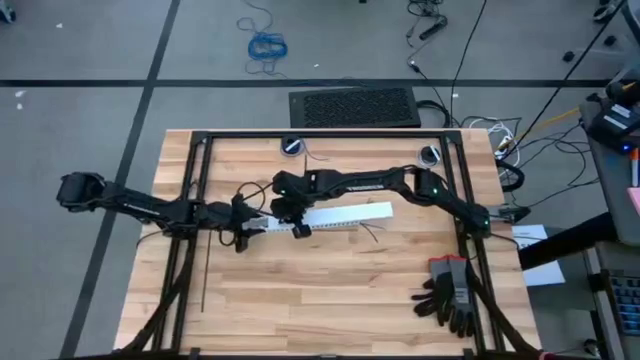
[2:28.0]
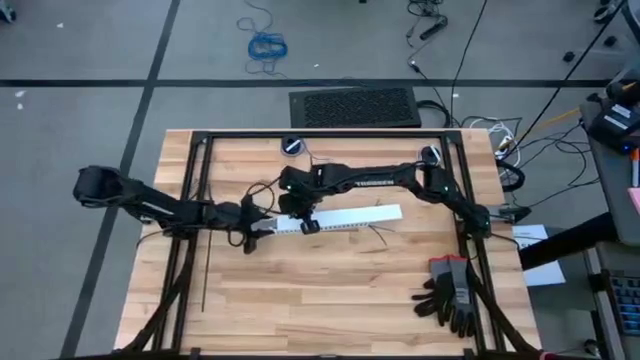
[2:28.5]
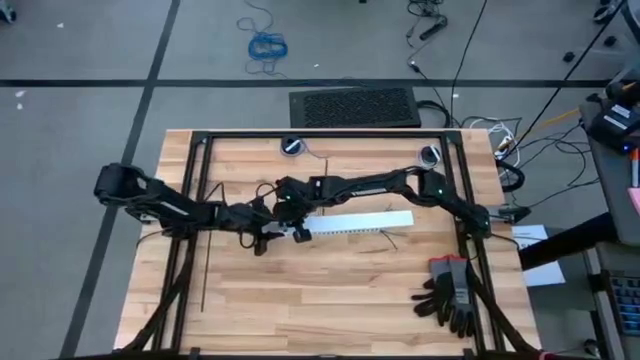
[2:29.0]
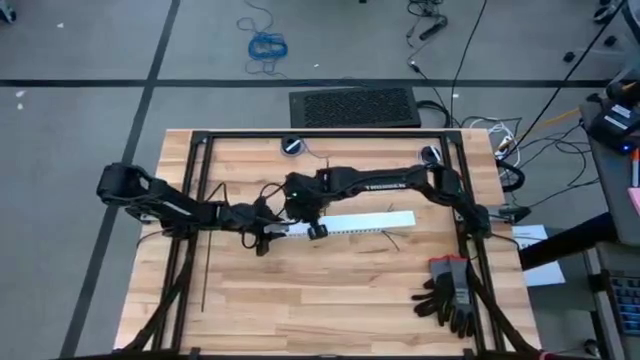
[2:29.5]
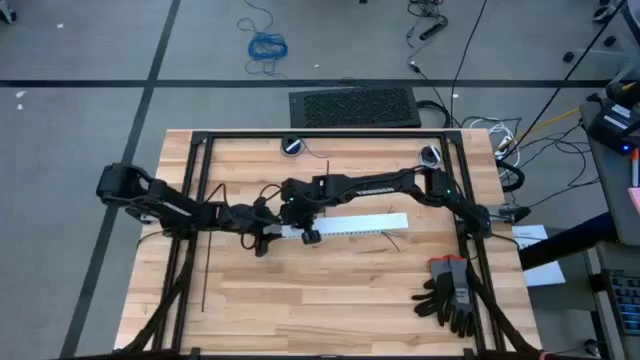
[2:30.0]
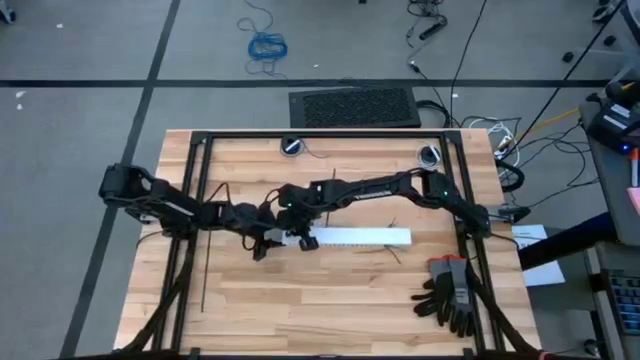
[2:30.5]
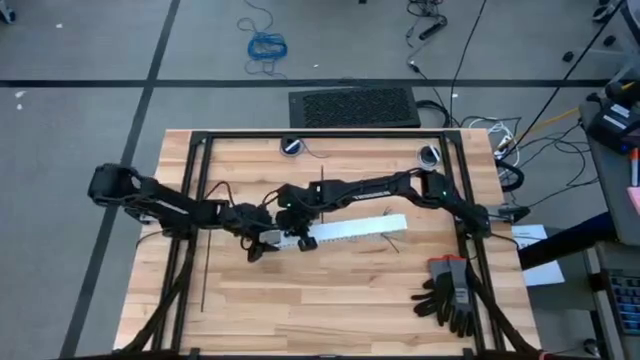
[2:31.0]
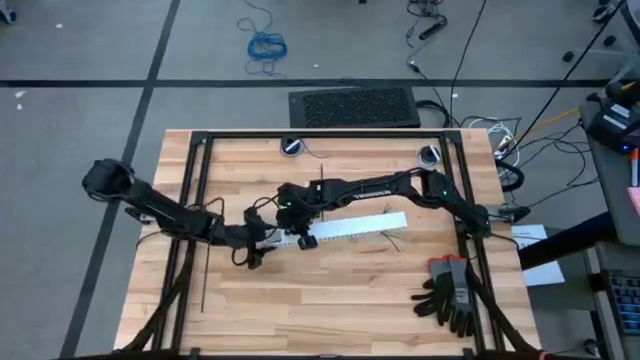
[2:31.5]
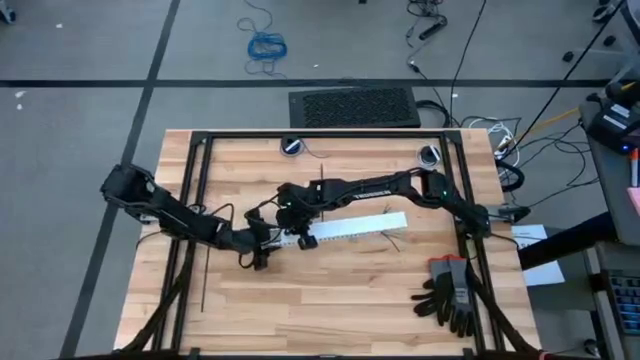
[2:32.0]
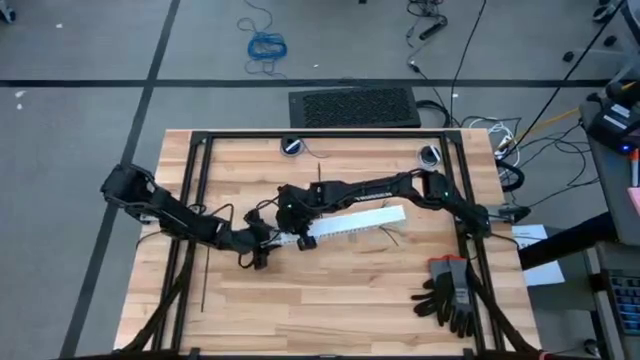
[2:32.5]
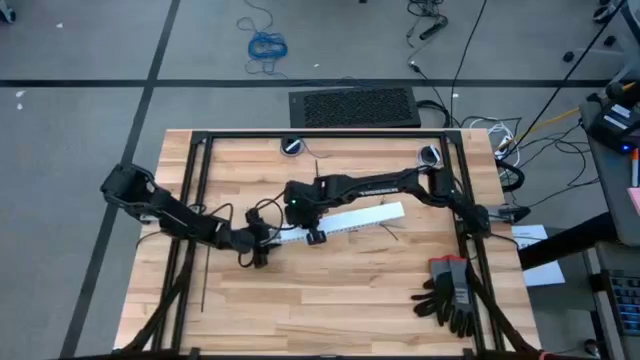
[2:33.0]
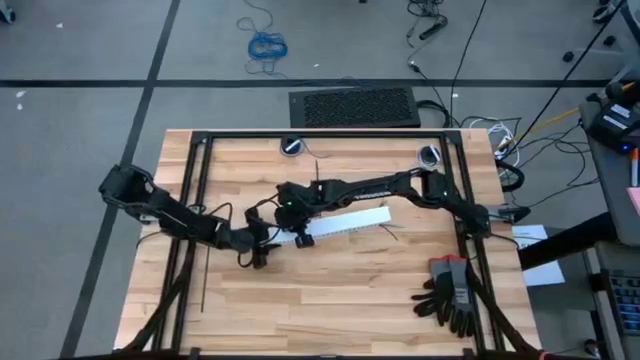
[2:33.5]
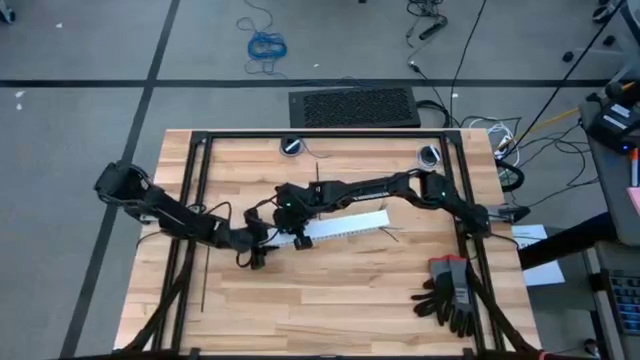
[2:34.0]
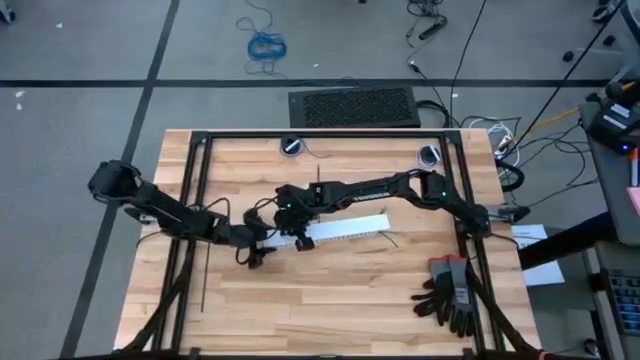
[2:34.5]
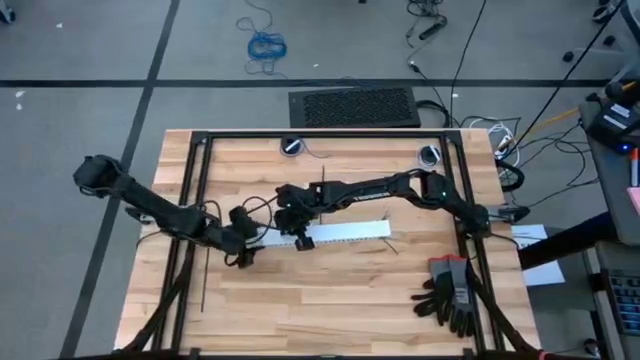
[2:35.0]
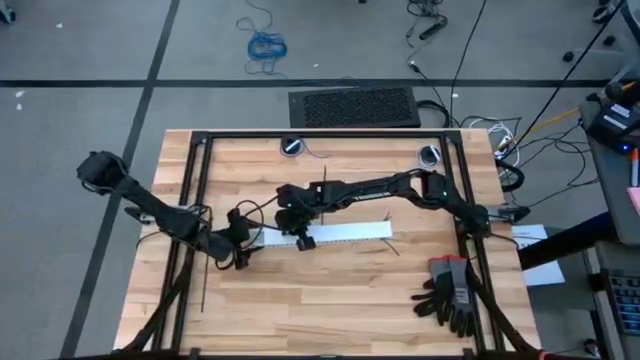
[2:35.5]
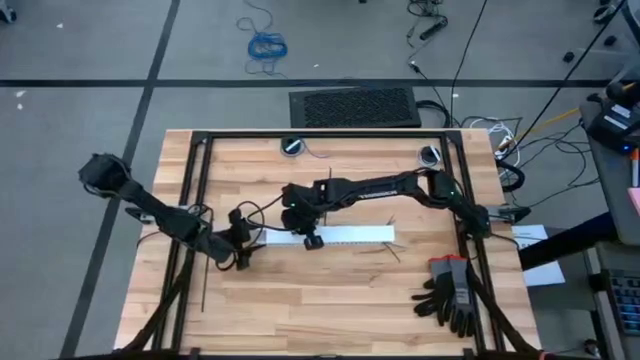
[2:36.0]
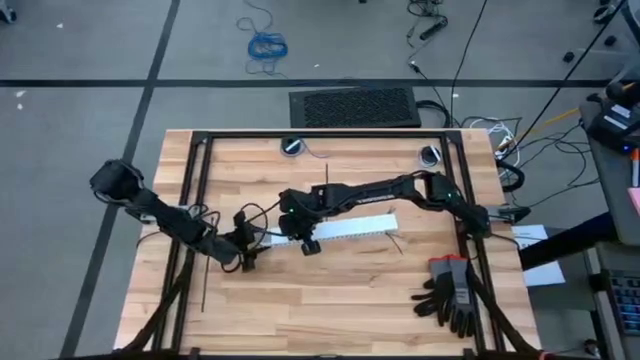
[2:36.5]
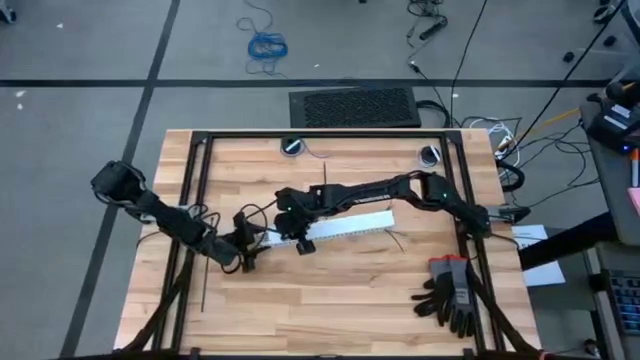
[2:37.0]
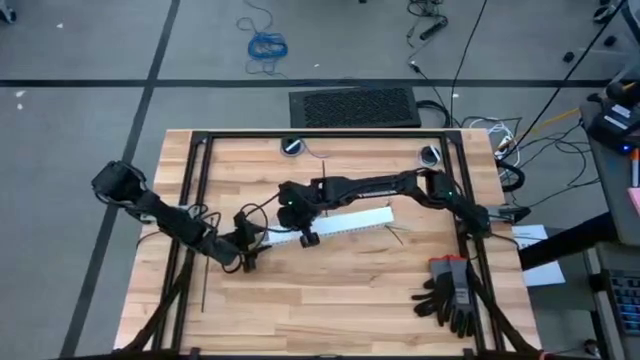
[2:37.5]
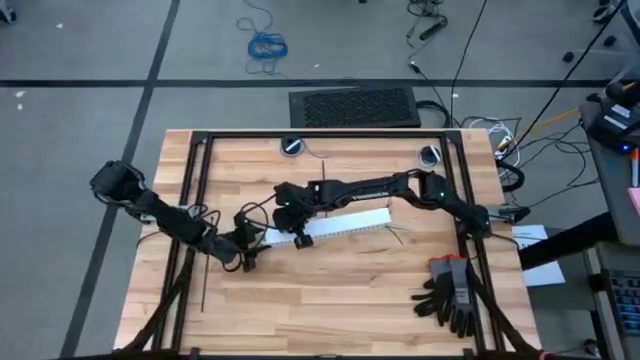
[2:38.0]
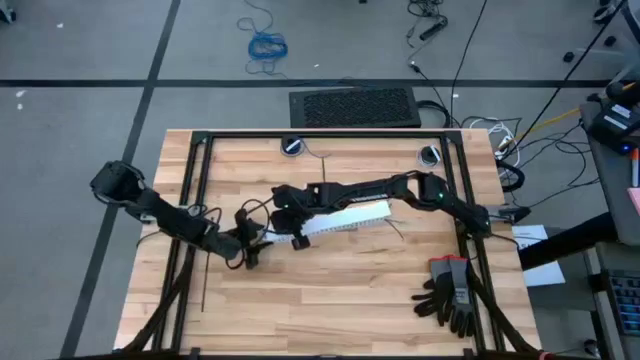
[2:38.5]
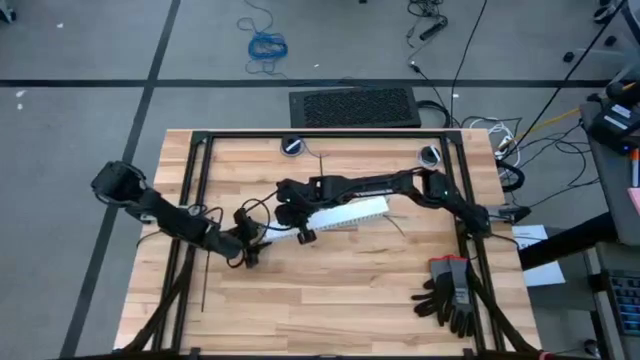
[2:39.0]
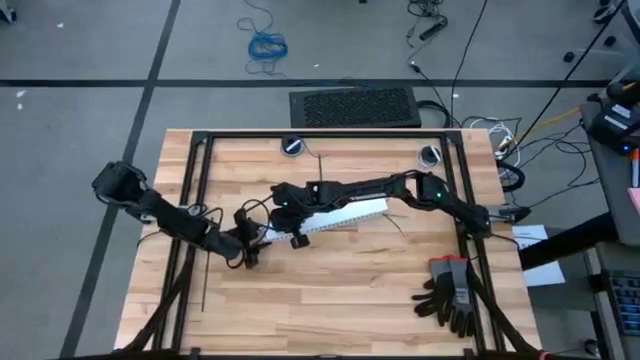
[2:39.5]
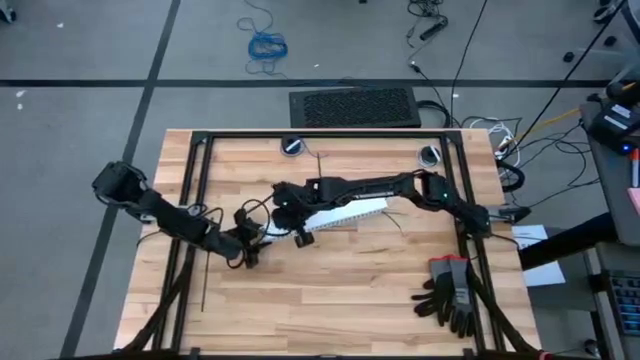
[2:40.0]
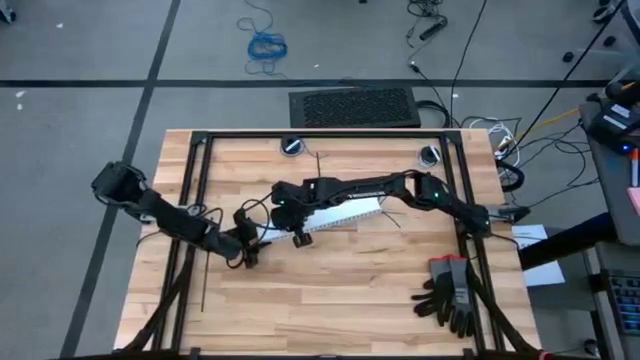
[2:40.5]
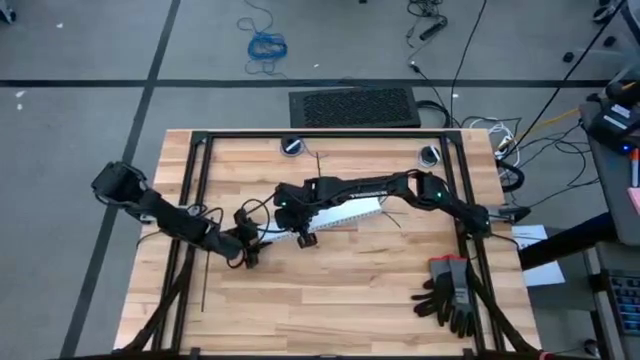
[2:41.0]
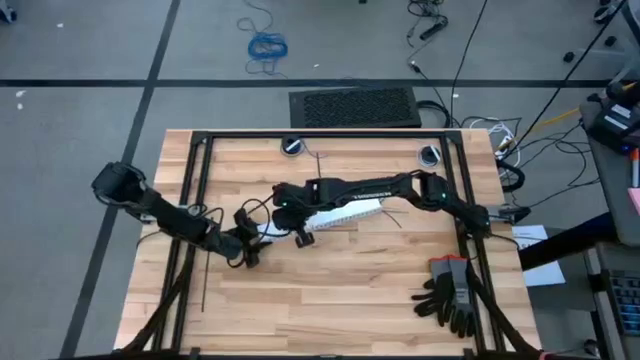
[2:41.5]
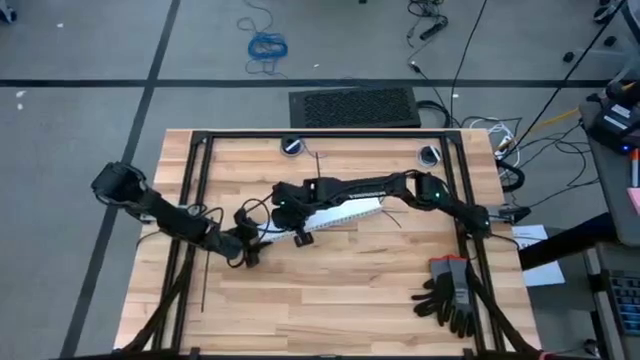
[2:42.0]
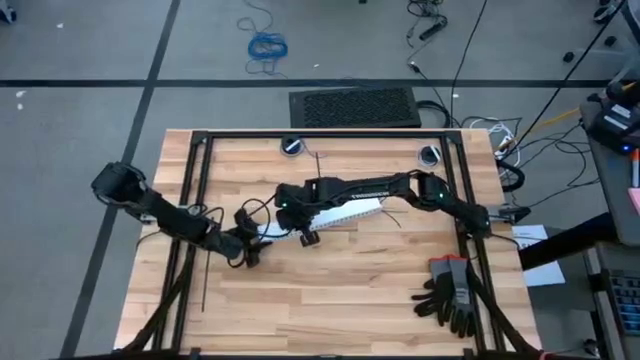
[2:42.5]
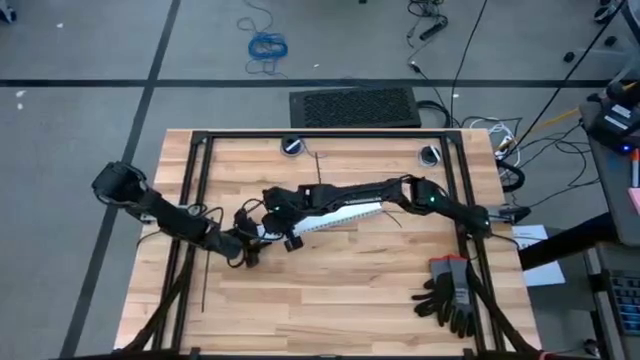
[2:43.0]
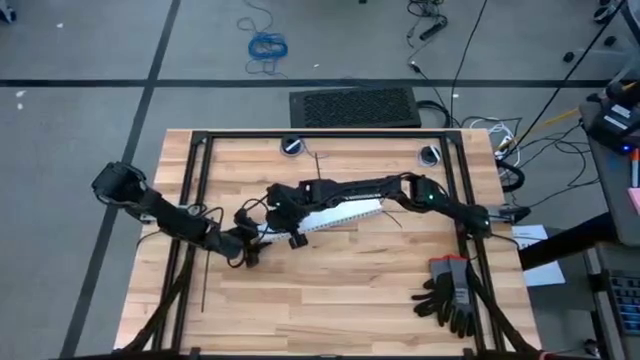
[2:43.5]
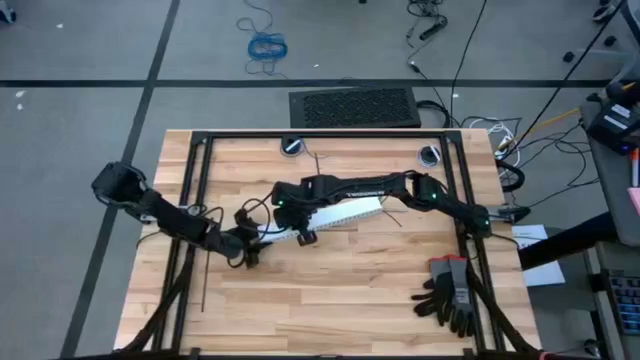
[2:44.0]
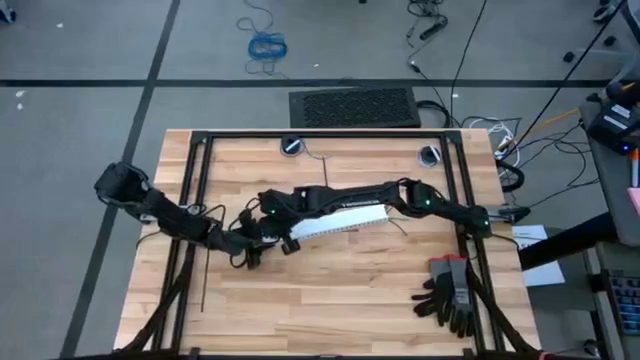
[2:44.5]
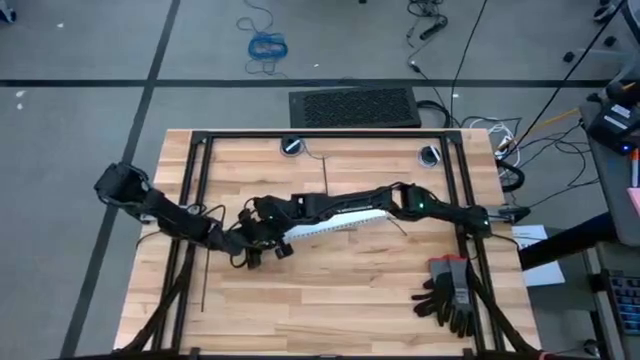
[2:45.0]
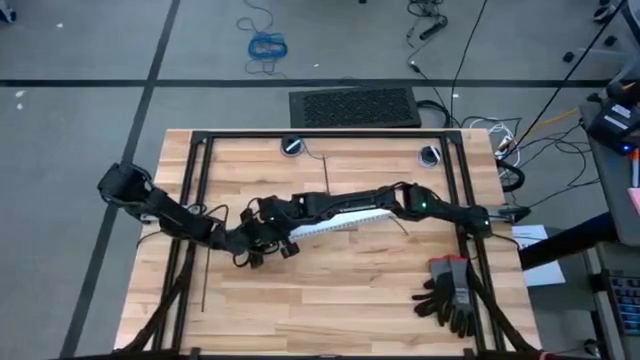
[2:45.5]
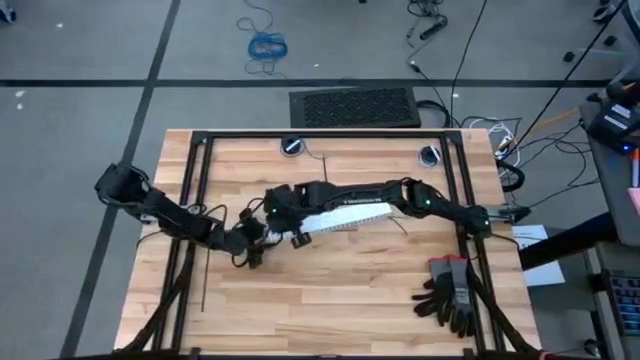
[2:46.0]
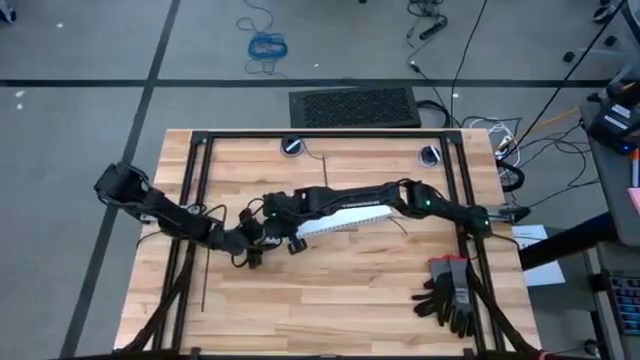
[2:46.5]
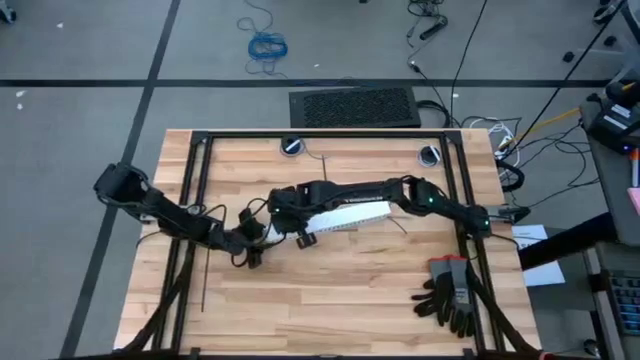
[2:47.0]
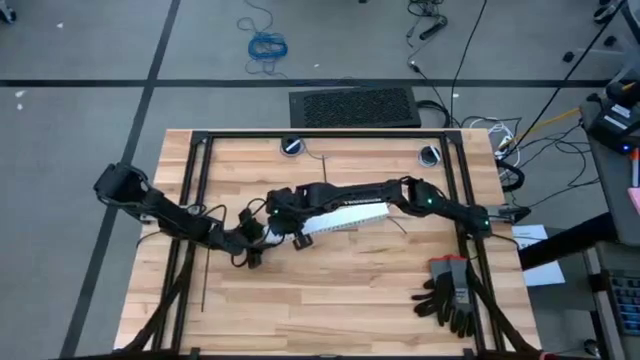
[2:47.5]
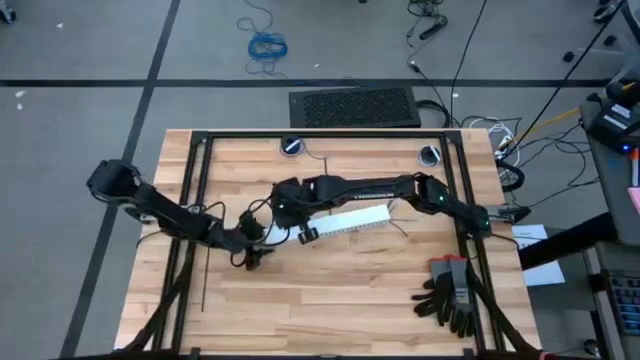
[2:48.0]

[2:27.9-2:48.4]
Task: Ziptie cables
Close the cable duct
